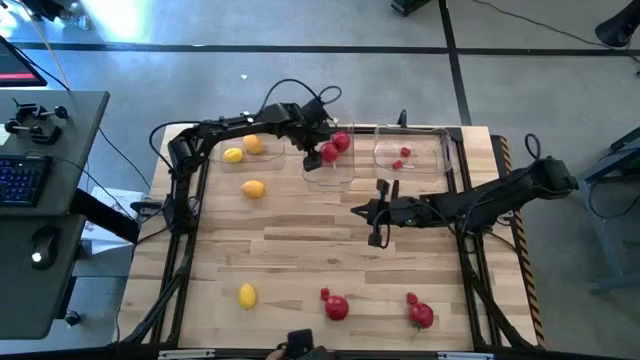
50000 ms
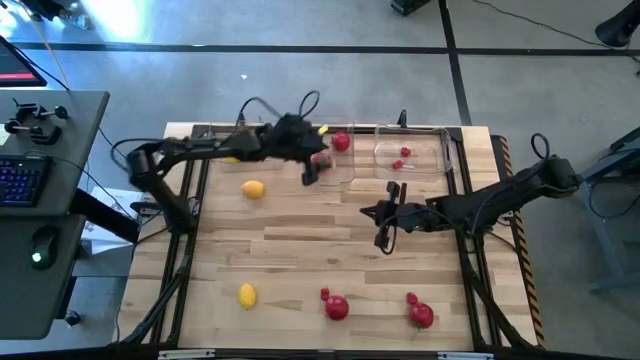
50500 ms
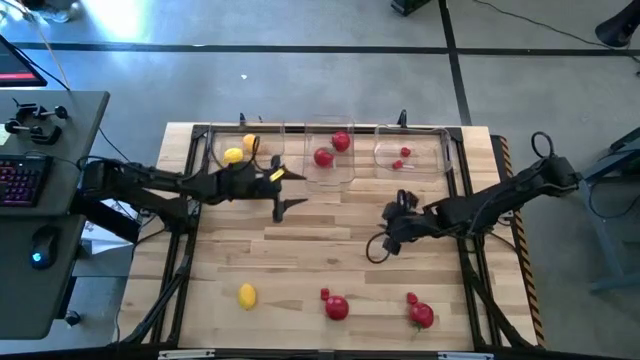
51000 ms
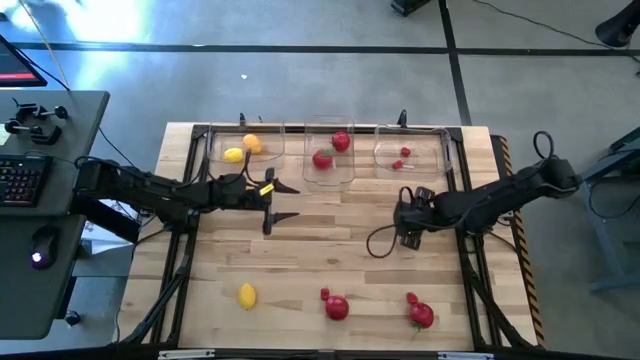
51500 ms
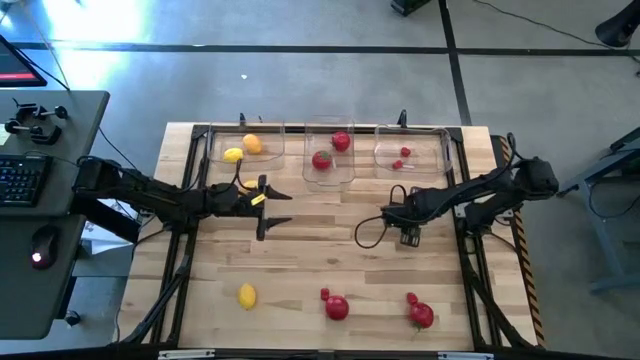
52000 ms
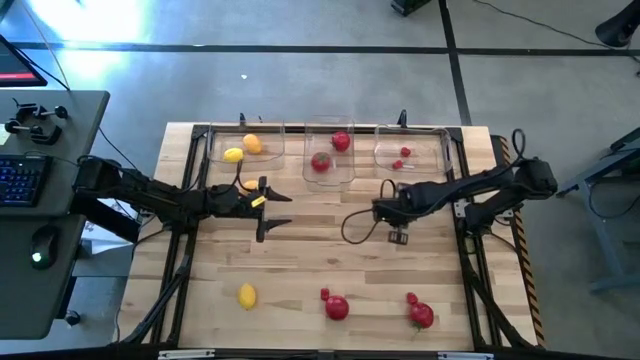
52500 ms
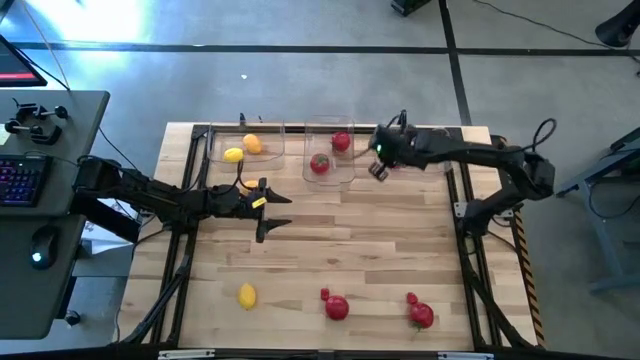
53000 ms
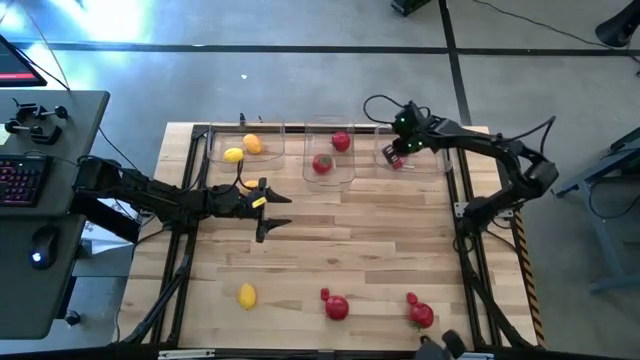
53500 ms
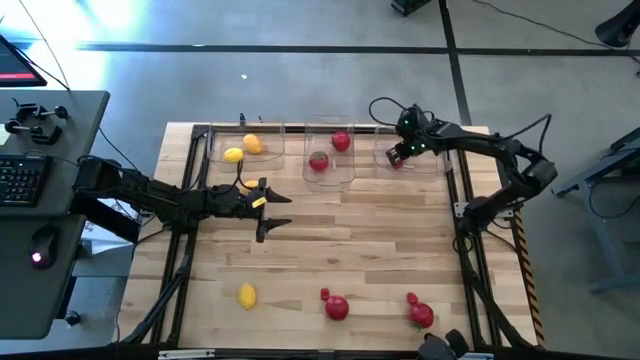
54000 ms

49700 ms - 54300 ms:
Task: Sort produce into baskets
Put the top chili pepper into the right transparent bin

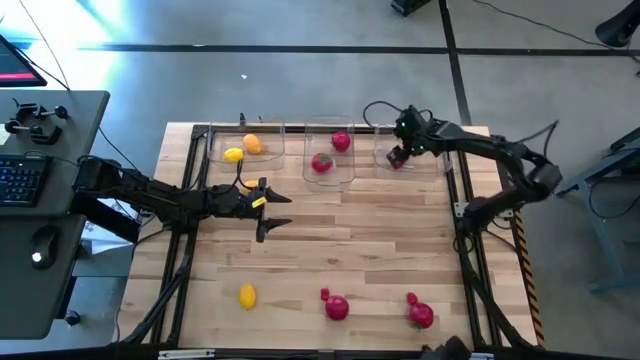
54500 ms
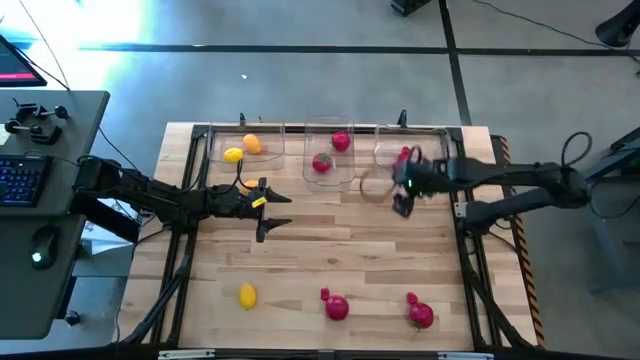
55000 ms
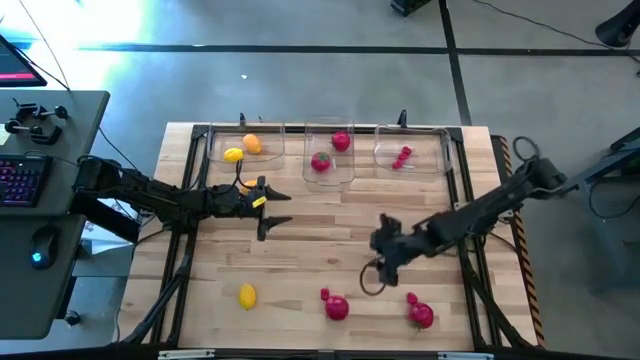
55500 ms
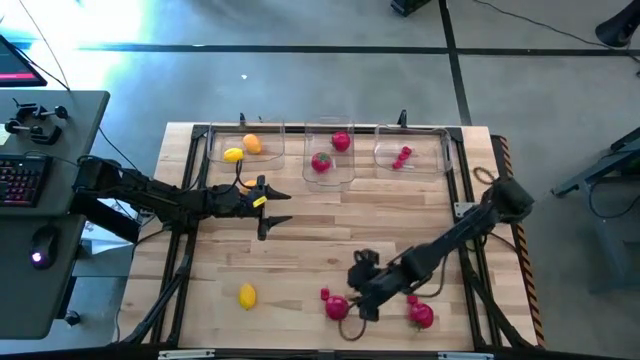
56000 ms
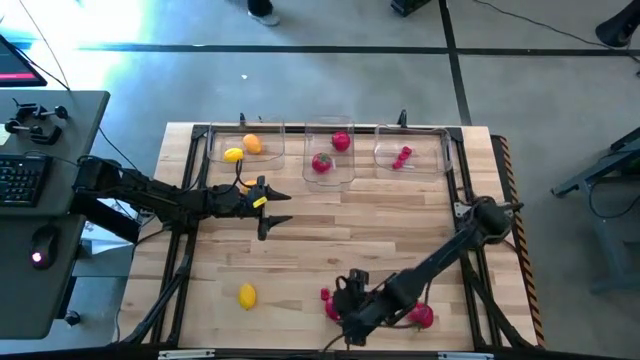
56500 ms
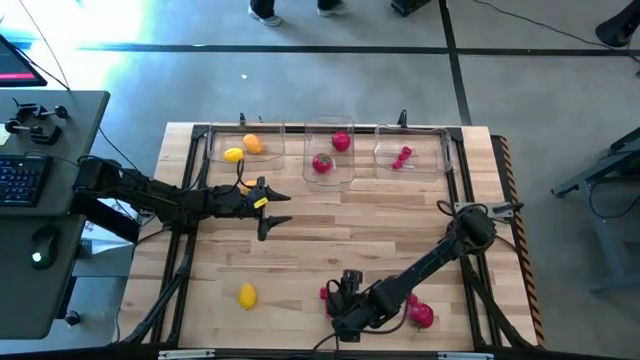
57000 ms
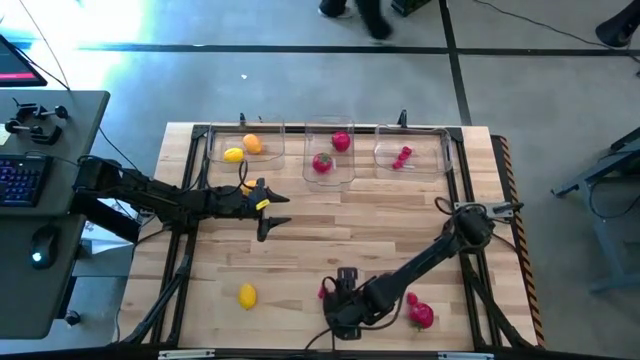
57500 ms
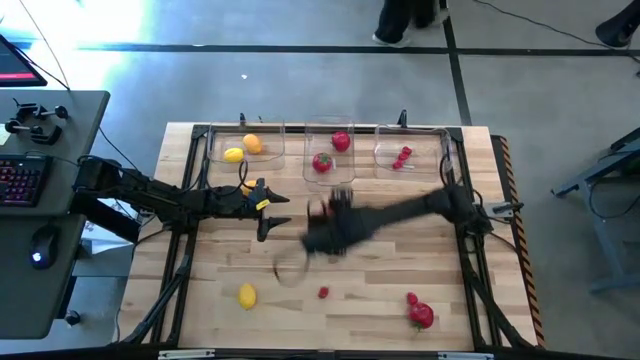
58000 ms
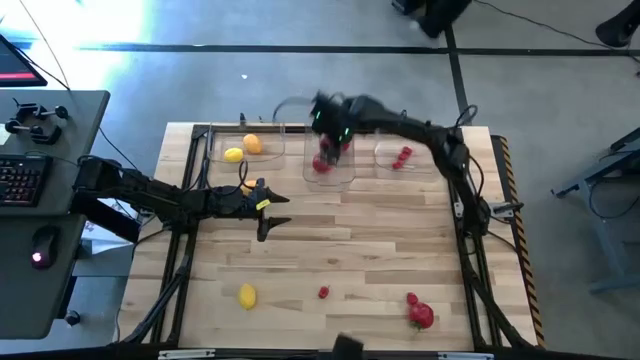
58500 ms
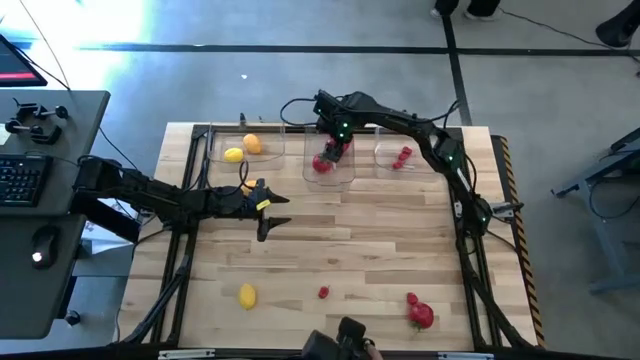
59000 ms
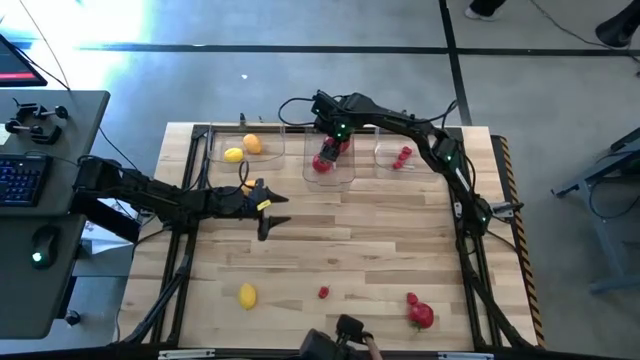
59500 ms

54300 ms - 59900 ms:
Put the tomato into the middle transparent bin

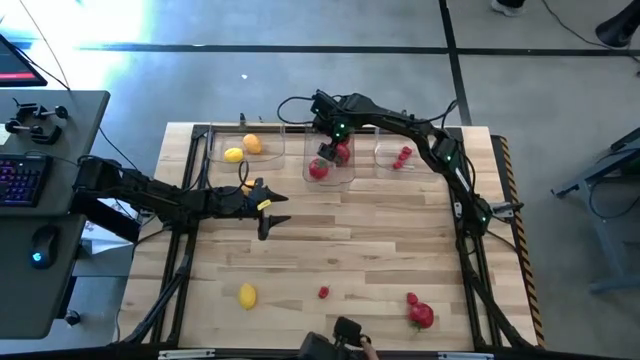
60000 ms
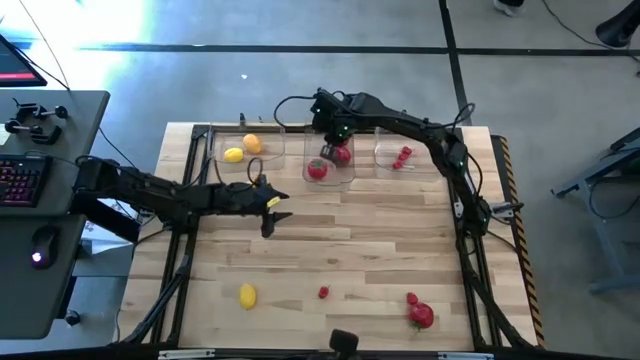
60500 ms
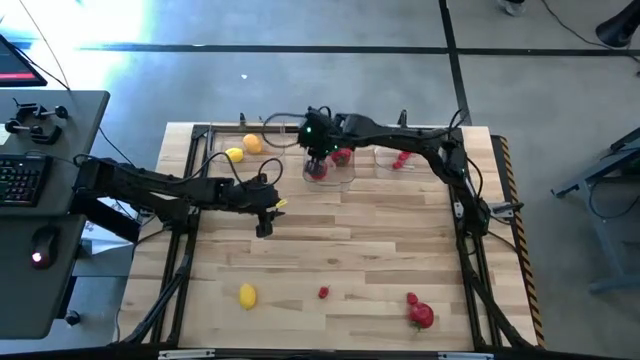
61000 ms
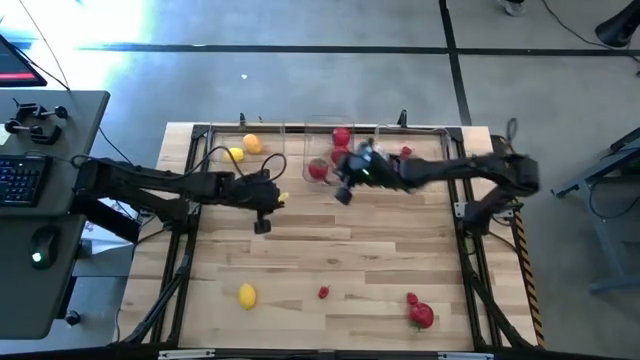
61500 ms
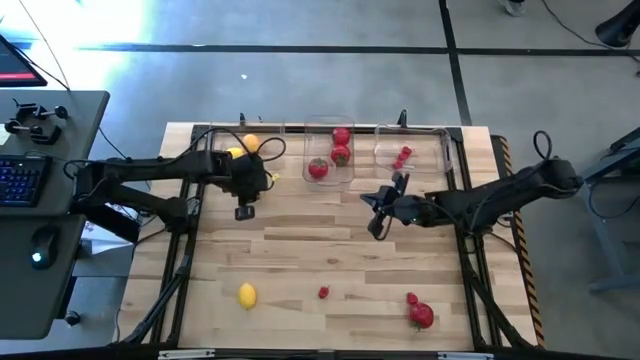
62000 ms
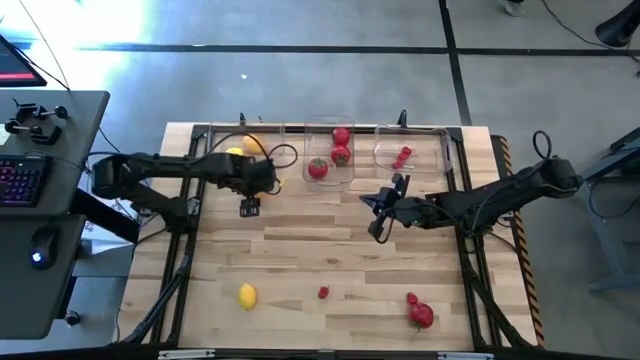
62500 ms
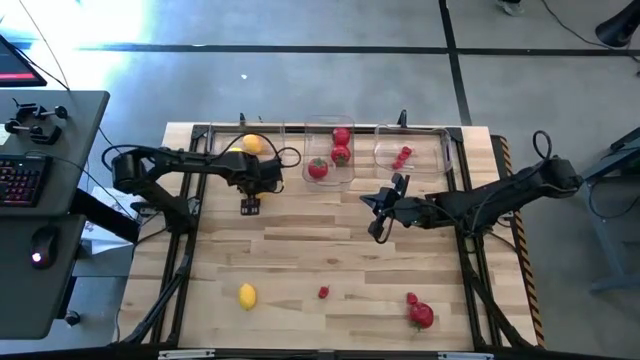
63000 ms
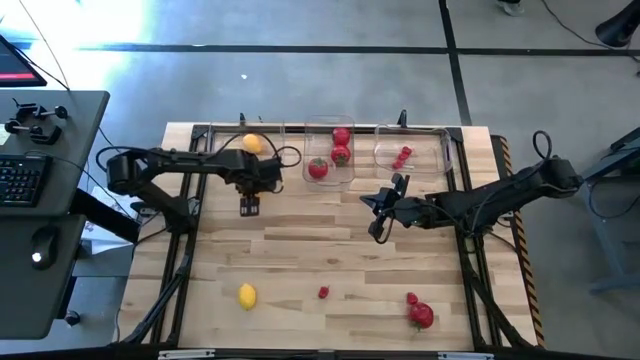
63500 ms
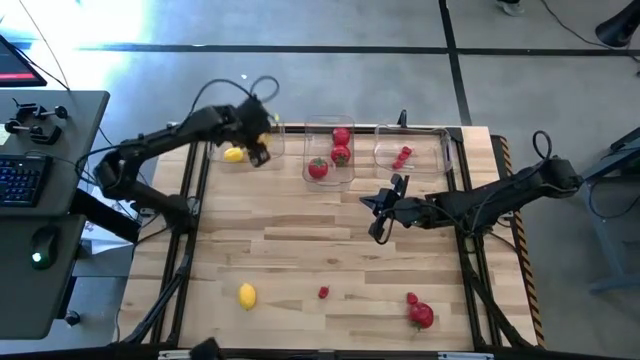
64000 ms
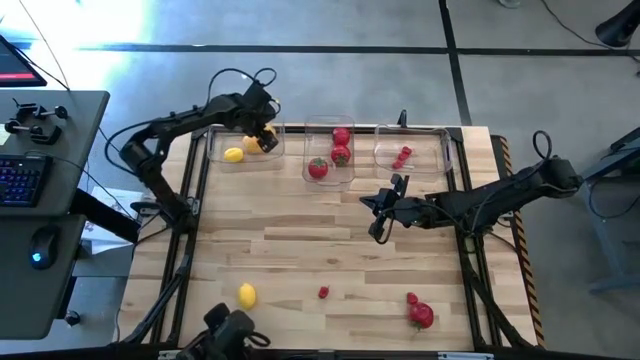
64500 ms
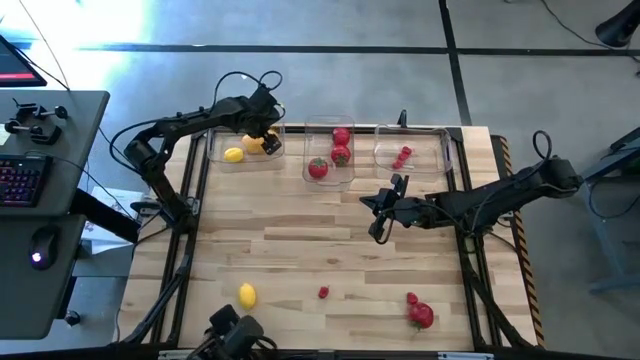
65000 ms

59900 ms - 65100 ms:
Put the lemon into the left transparent bin

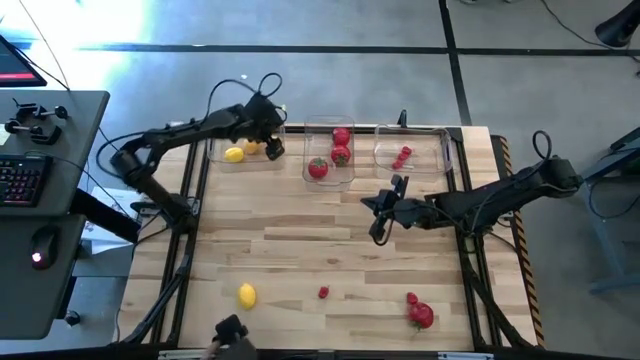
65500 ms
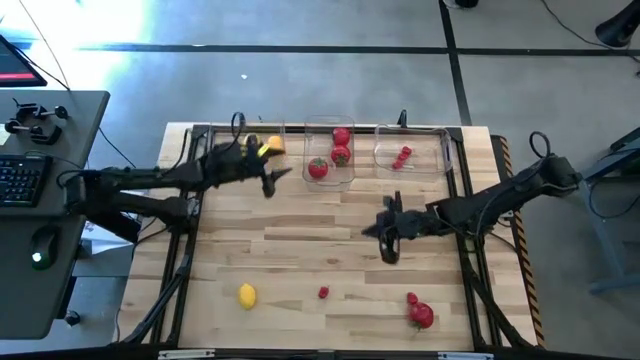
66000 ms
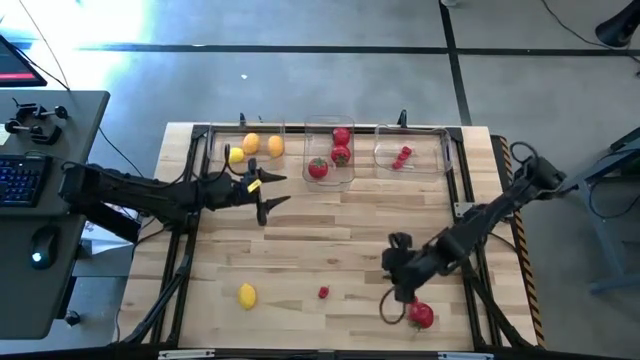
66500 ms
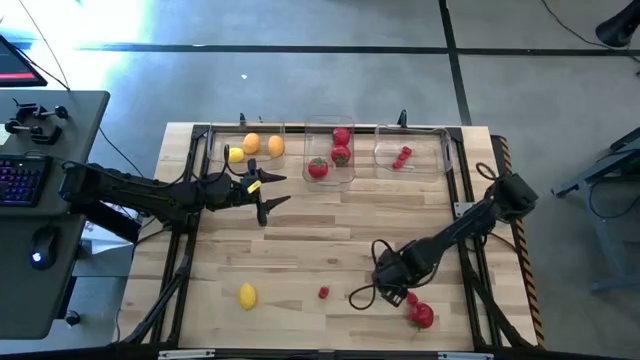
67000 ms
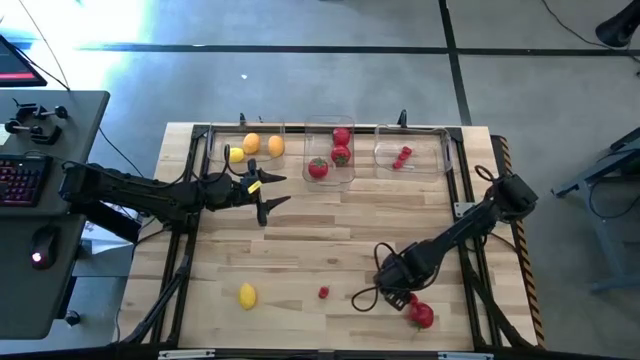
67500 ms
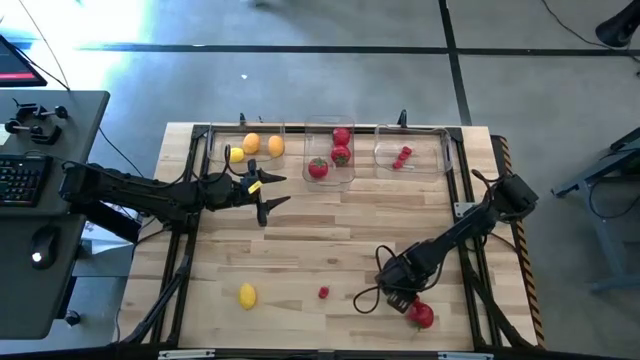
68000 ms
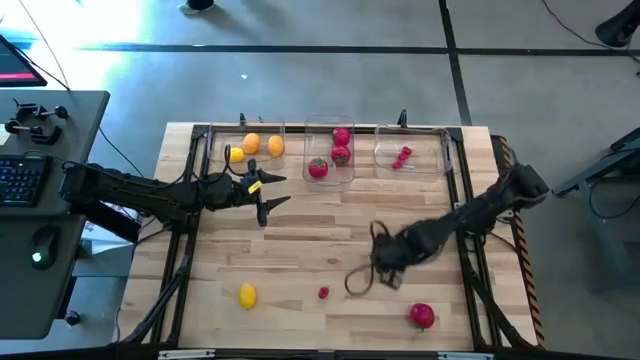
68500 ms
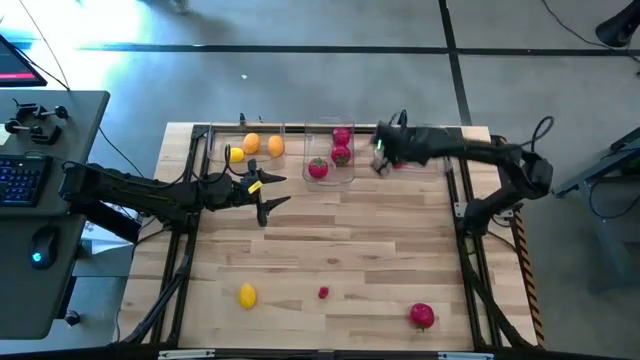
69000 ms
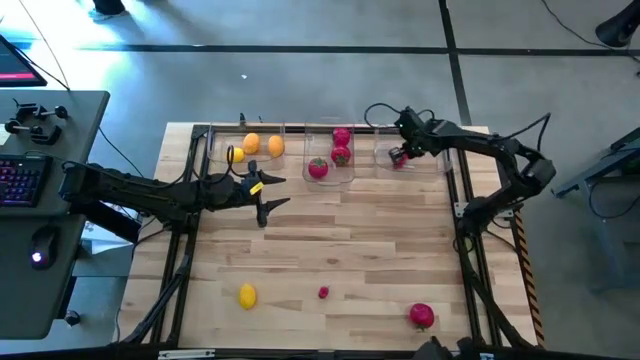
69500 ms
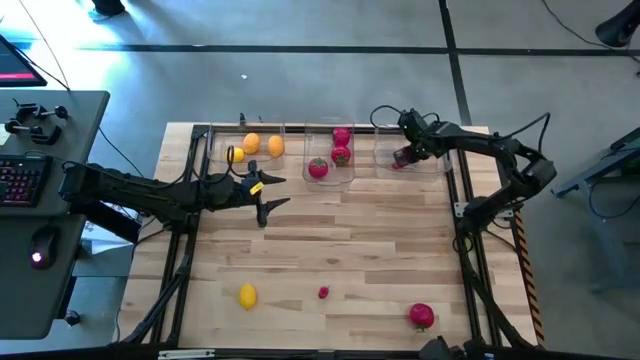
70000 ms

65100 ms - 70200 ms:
Put the chili pepper into the right transparent bin
